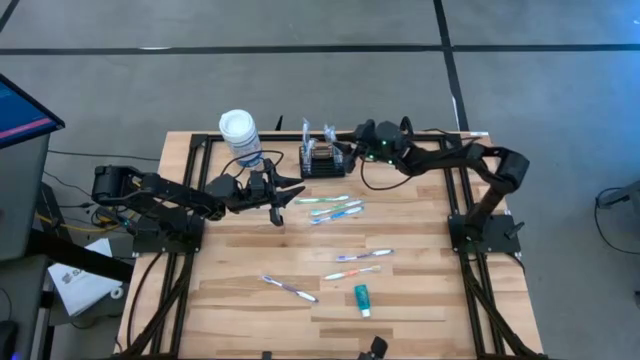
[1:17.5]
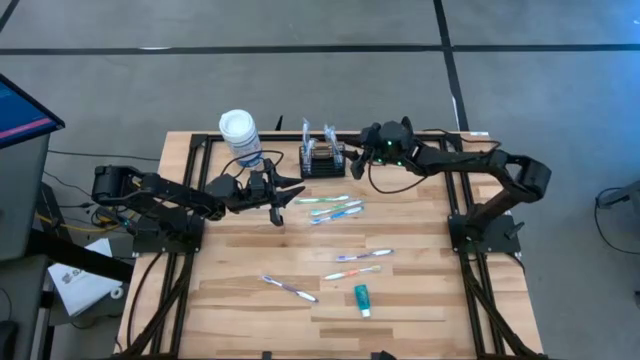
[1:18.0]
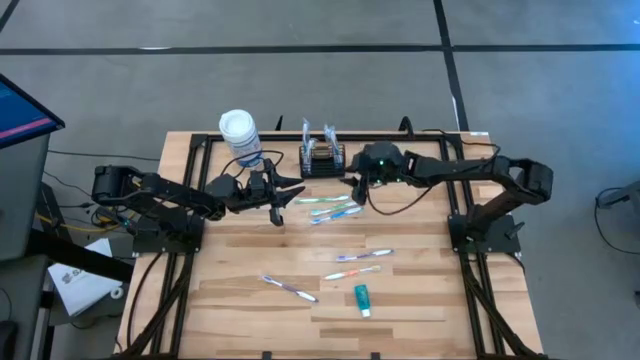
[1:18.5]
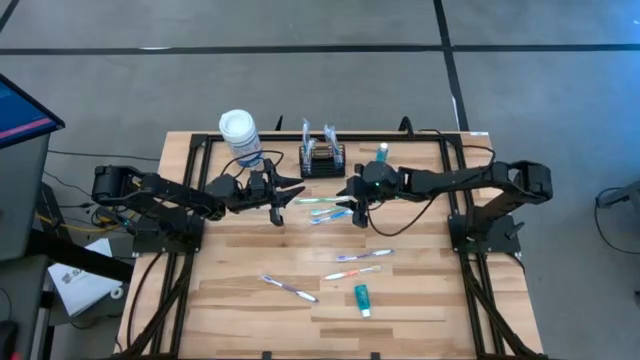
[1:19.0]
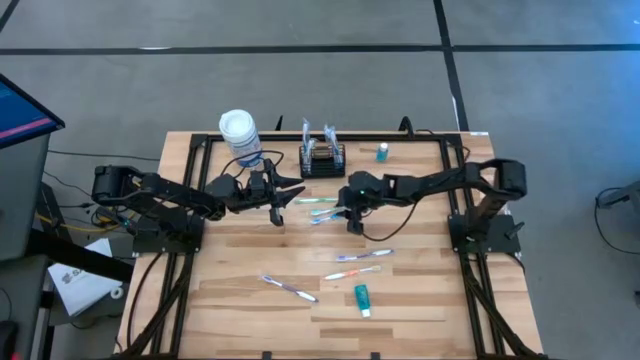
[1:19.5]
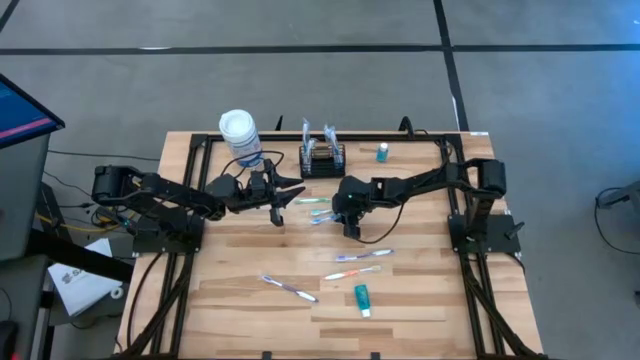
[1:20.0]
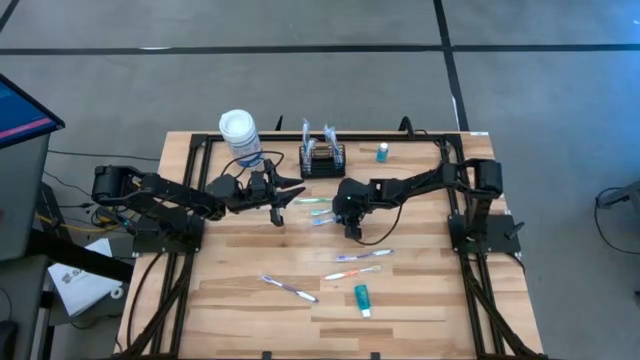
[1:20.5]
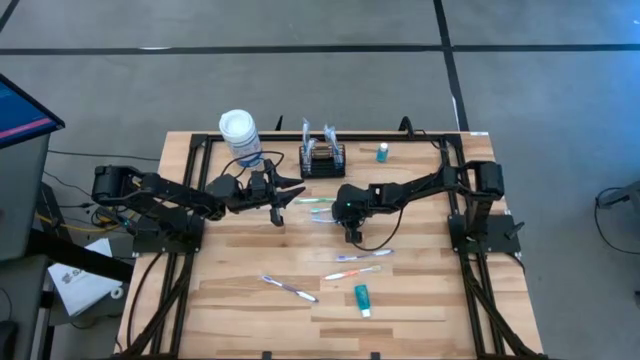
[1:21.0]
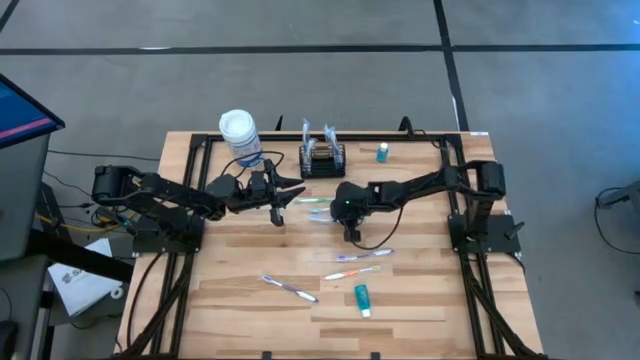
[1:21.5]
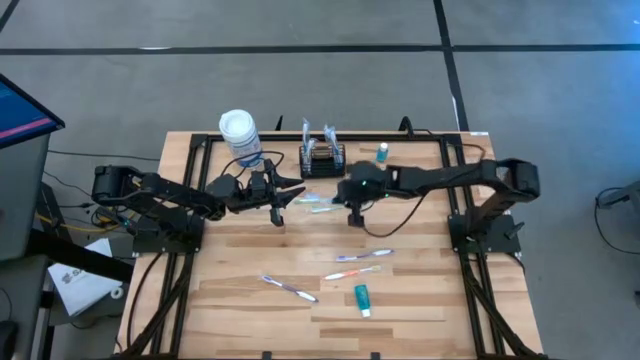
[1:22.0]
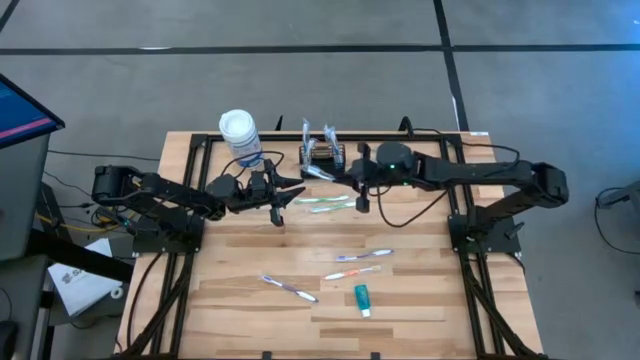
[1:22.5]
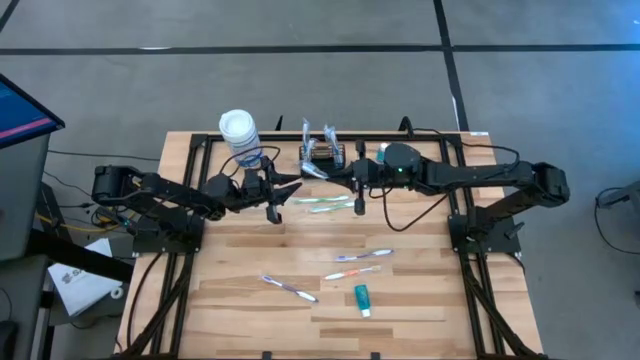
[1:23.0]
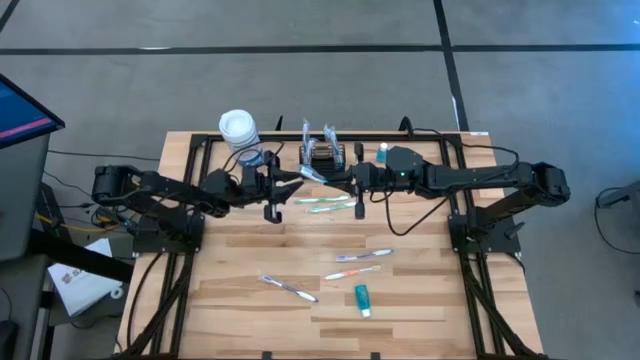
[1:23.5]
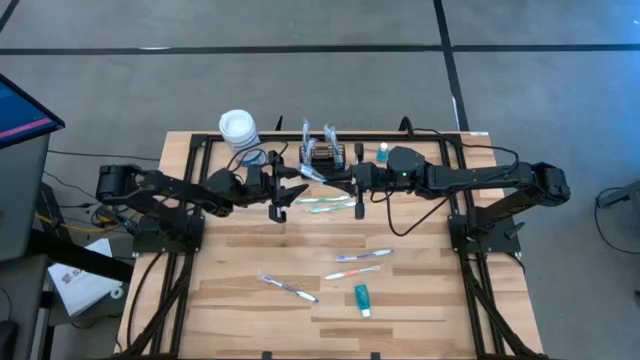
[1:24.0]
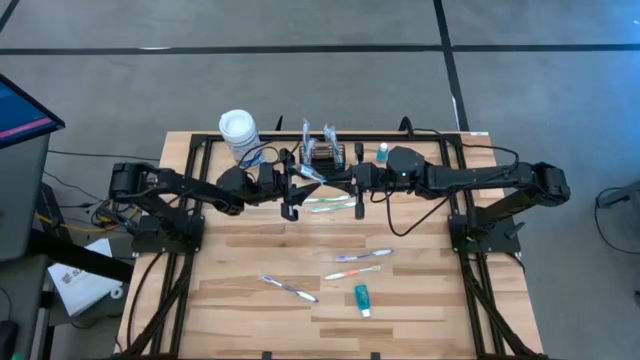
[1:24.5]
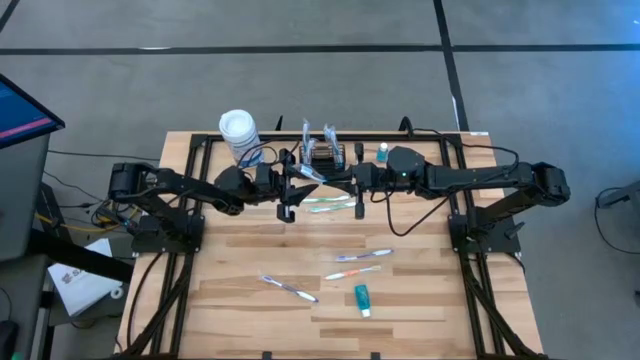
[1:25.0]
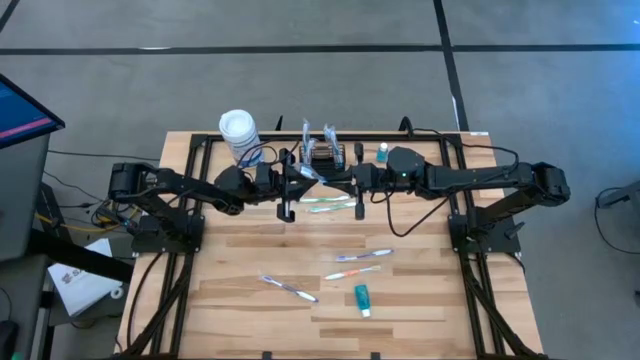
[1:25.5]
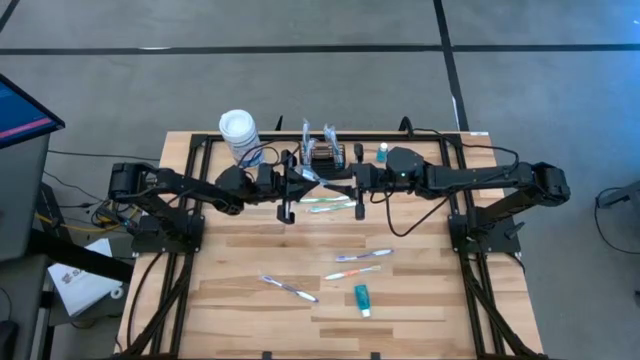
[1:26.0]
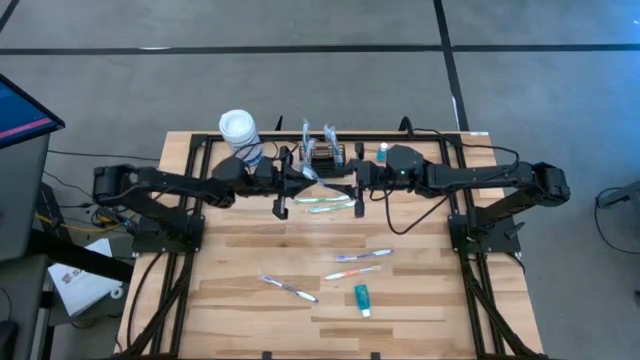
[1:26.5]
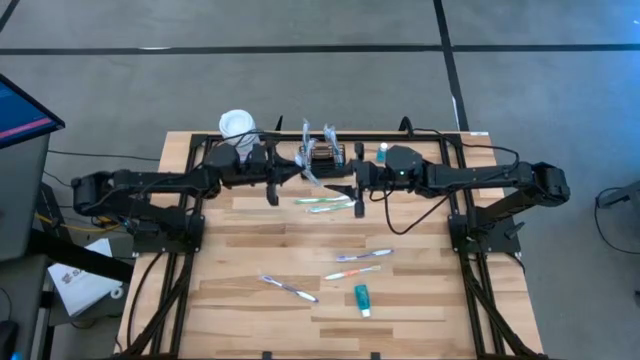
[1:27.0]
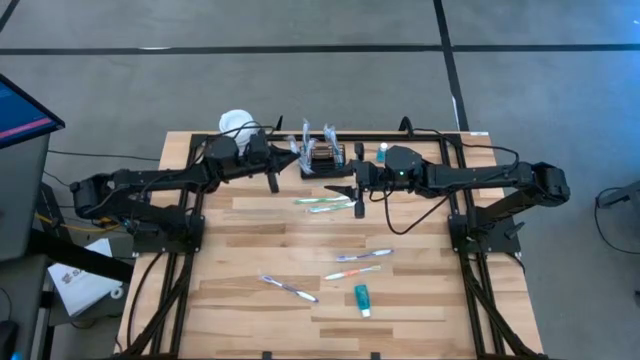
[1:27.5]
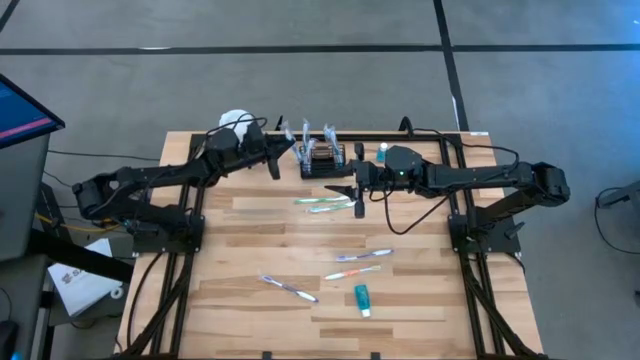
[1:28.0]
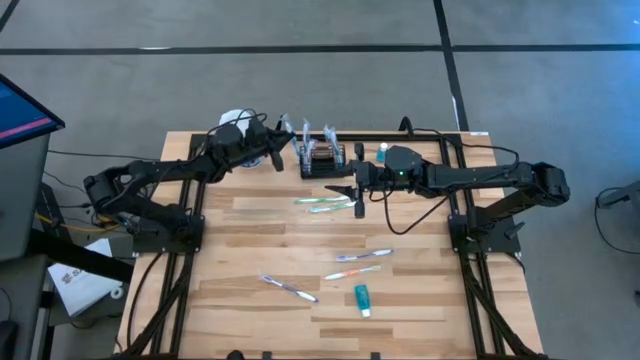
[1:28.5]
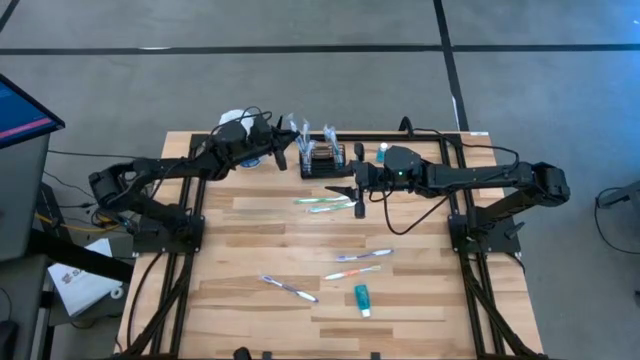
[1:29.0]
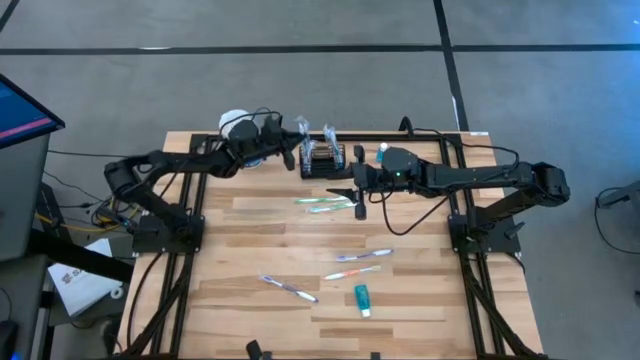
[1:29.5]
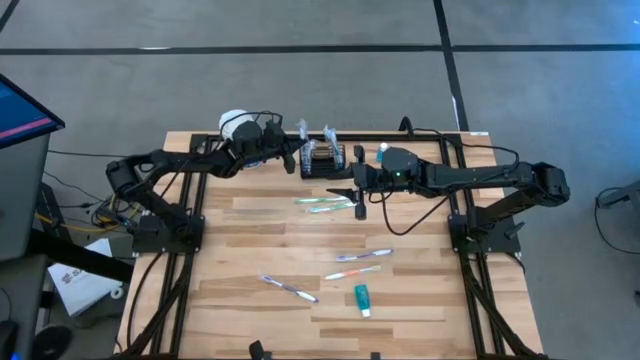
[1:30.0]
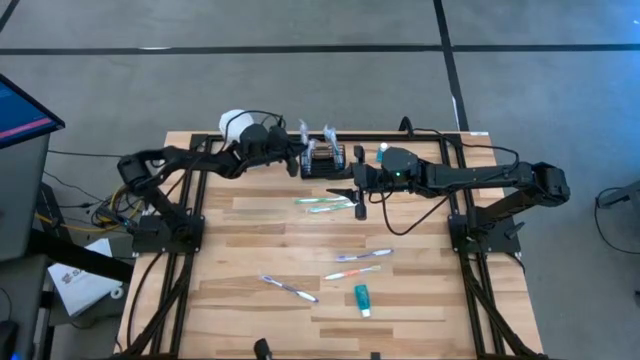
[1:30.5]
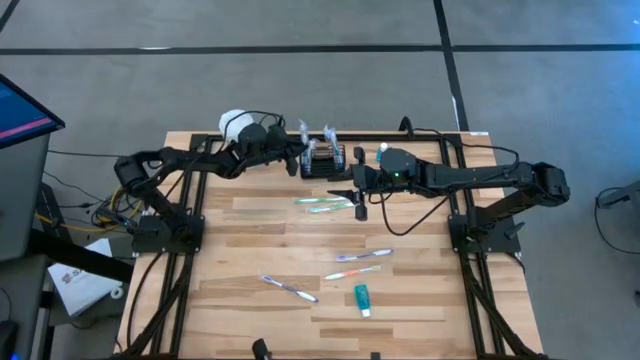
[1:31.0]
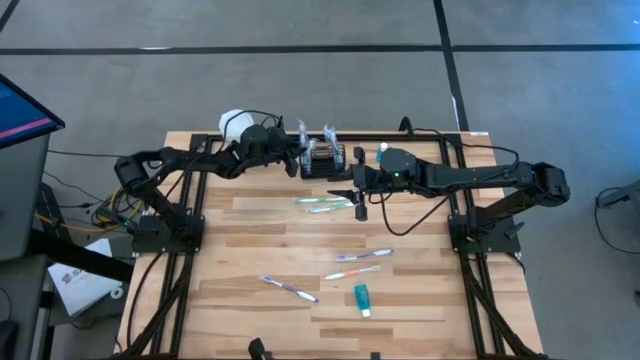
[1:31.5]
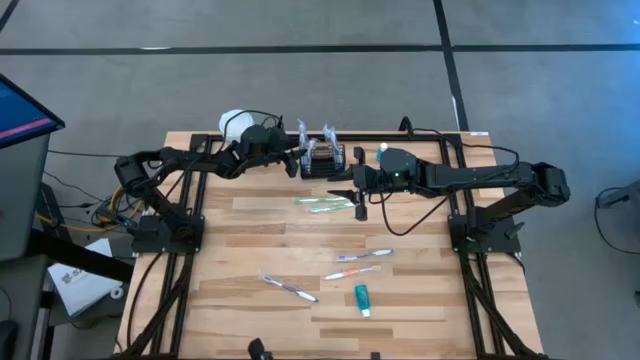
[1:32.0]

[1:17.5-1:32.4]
Task: Pick & Place toothbrushing station
Put the blue toothbrush into the black wire organizer

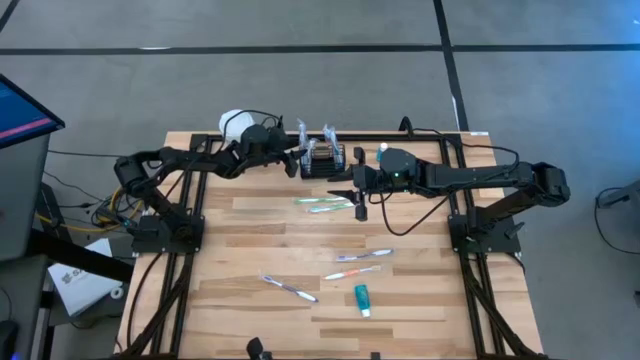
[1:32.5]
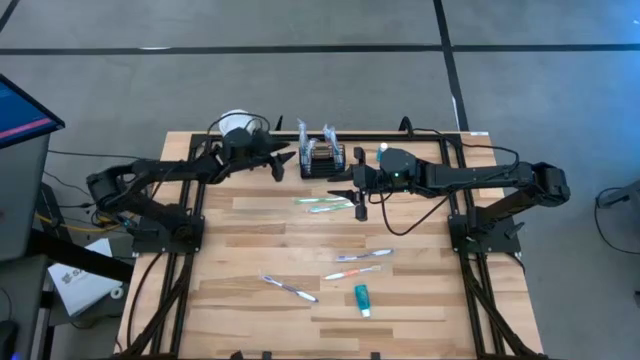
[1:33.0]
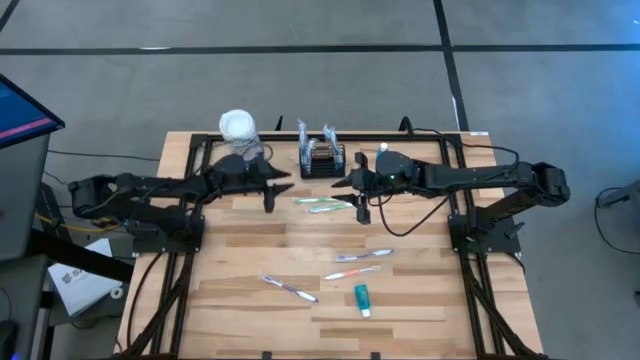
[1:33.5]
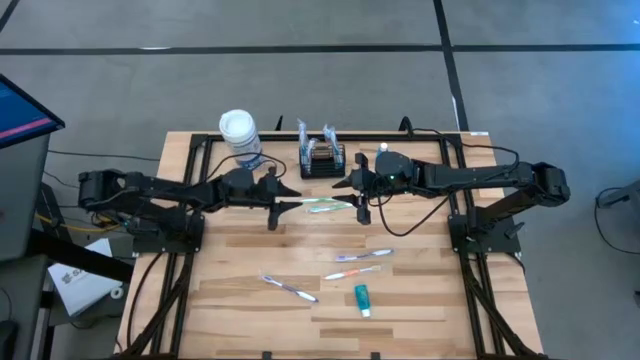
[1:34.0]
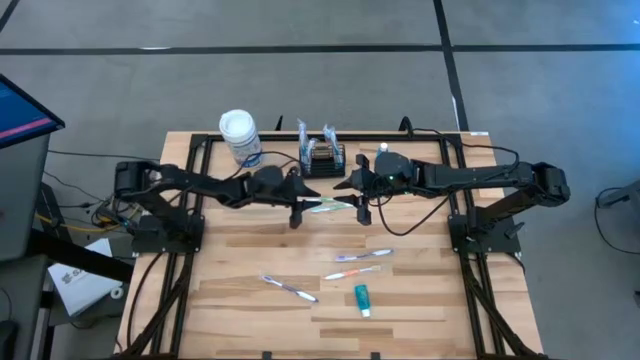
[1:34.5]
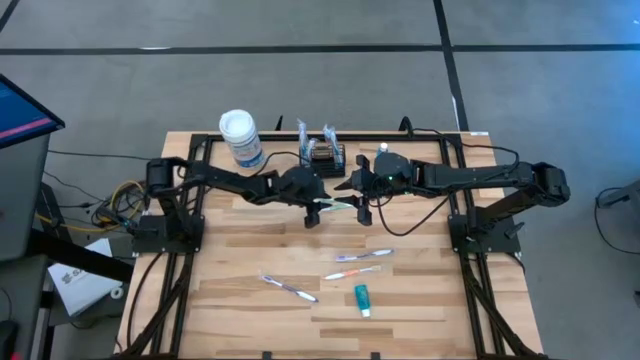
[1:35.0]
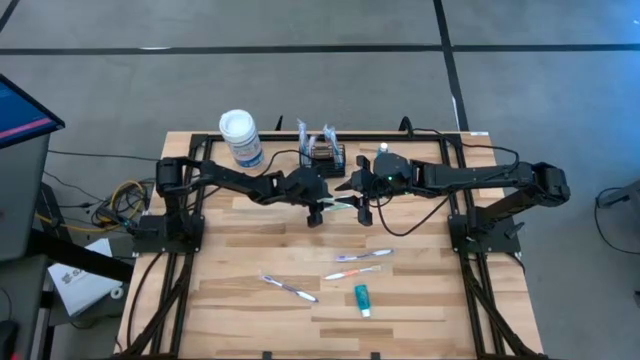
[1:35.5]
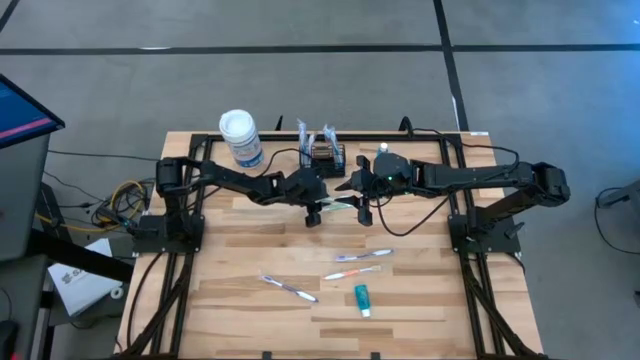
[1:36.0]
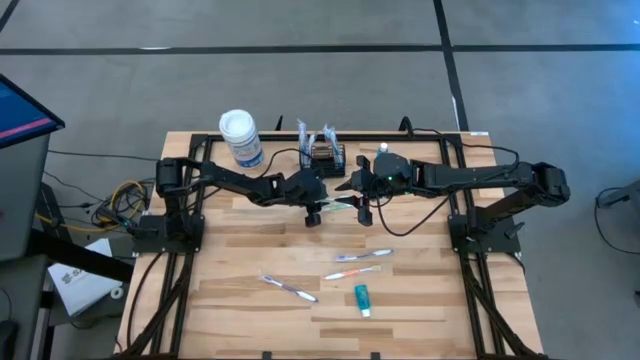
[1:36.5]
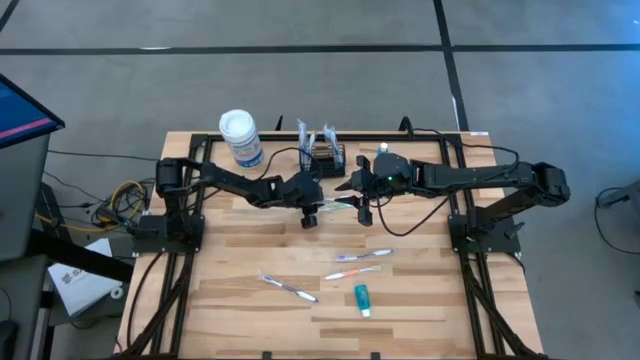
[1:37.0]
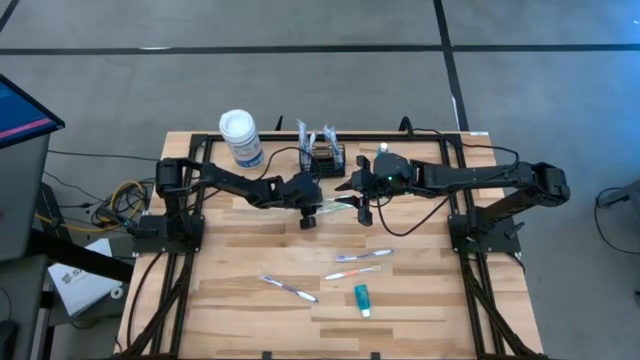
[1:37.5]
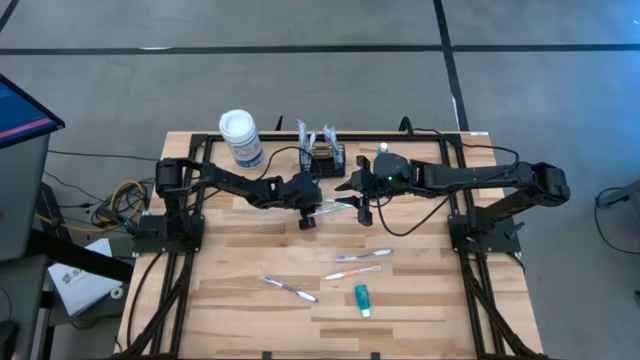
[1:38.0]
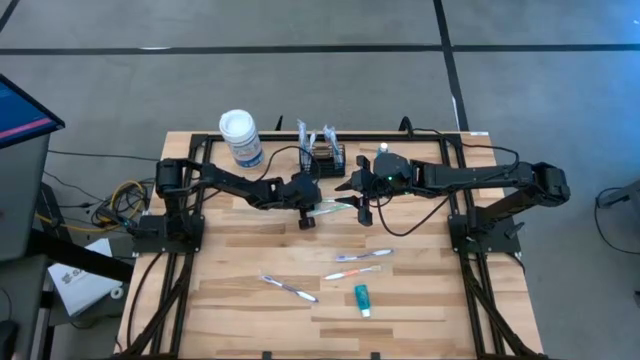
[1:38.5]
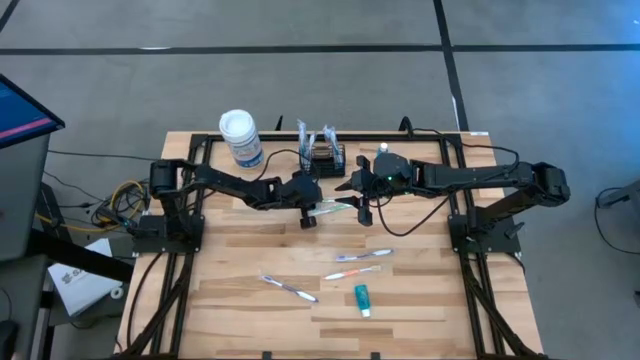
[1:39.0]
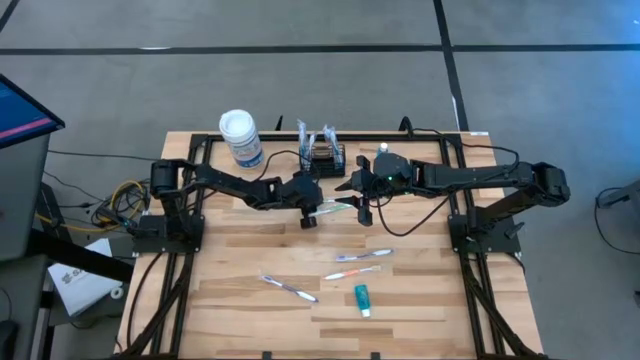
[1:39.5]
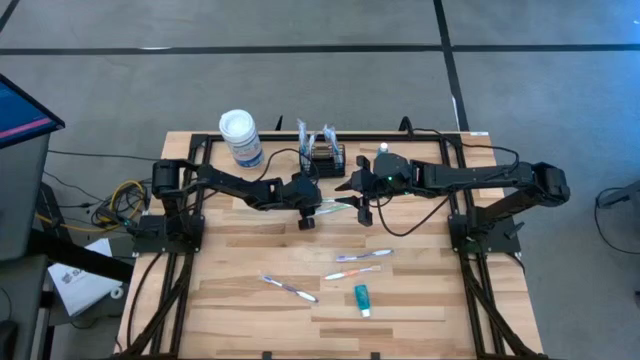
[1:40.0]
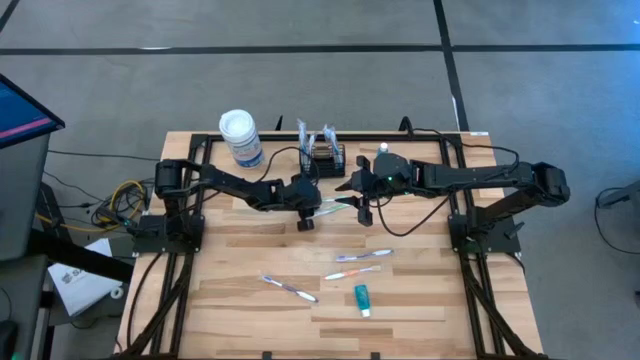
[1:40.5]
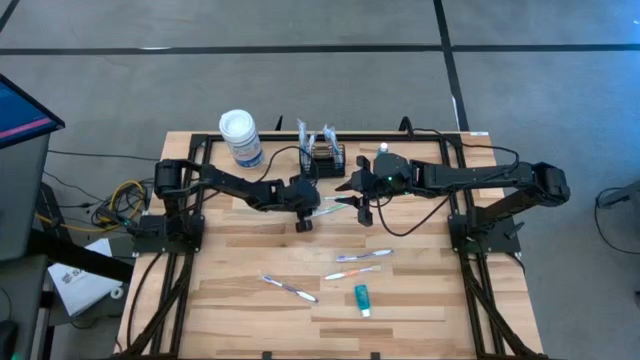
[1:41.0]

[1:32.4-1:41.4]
Put the top green toothbrush into the black wire organizer
